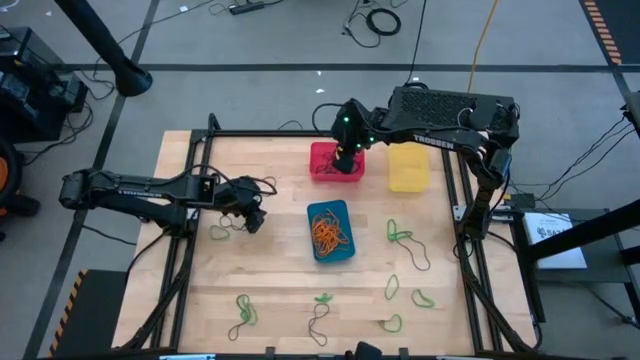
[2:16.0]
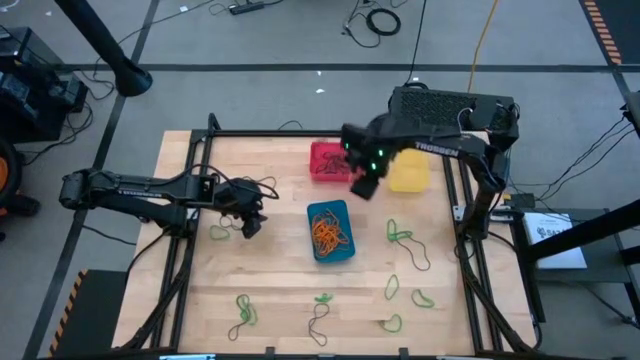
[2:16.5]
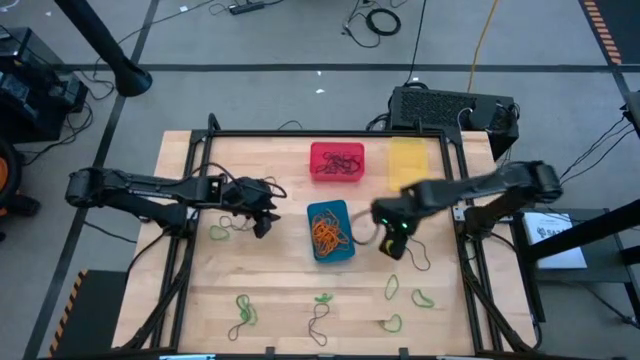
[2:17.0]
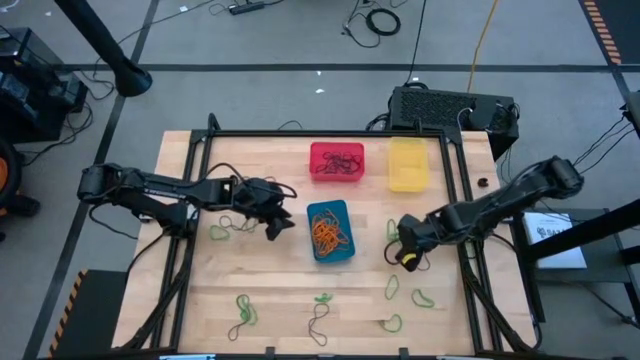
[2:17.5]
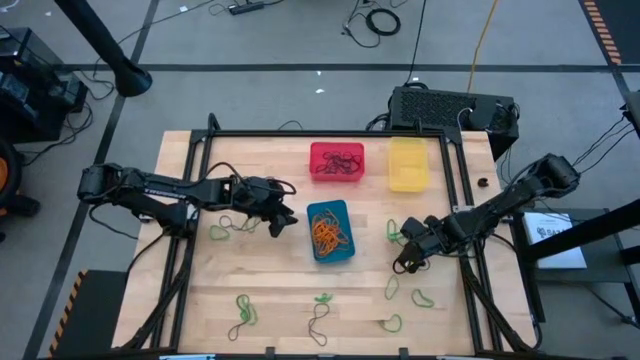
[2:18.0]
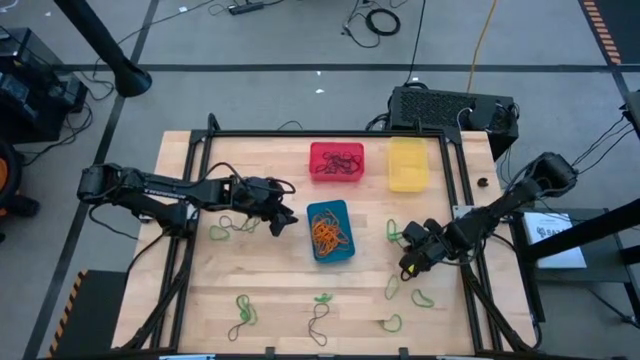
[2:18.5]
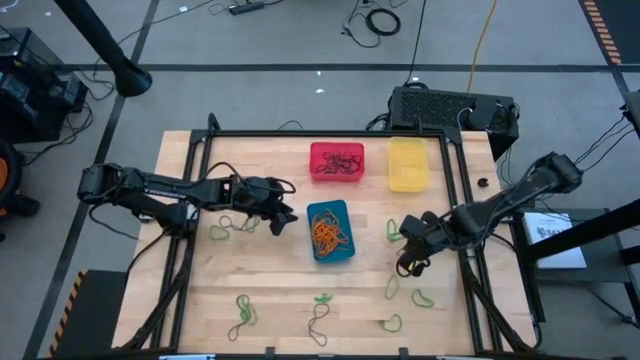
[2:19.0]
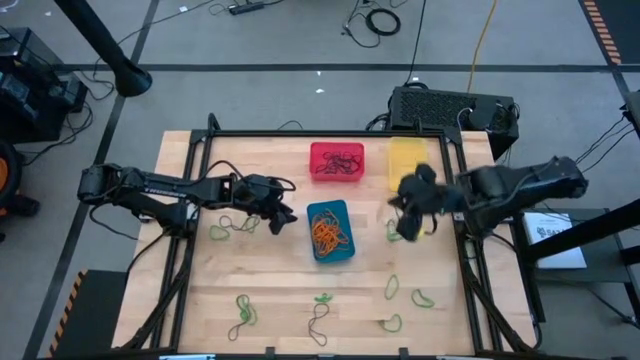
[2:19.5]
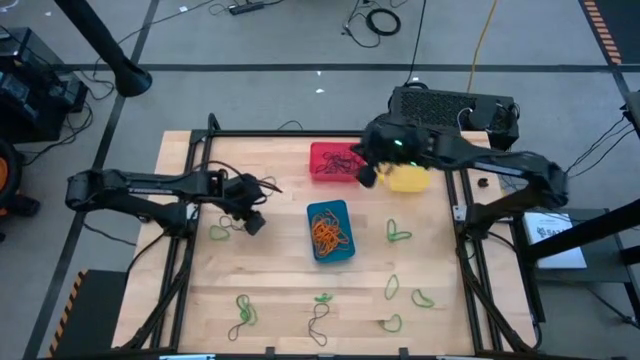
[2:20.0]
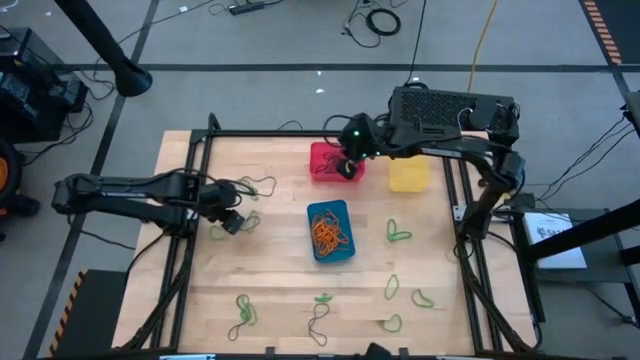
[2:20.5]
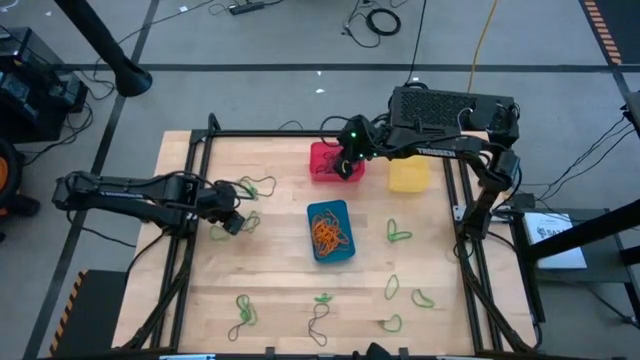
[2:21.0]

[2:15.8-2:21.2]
Task: Sort rubber bands into baskets
Put the purple rubber band into the red bin

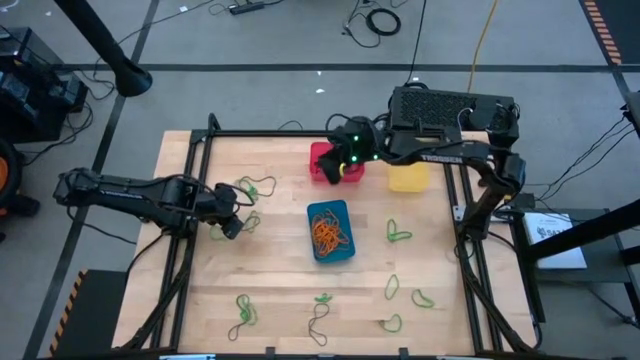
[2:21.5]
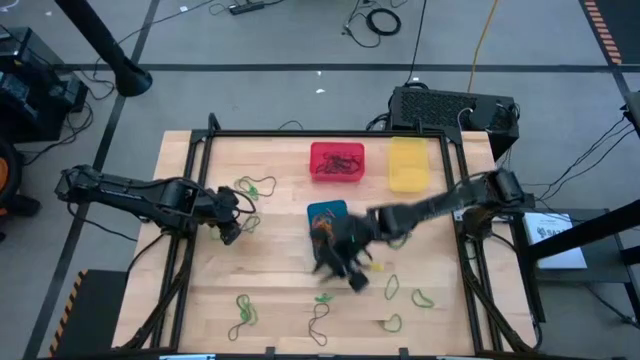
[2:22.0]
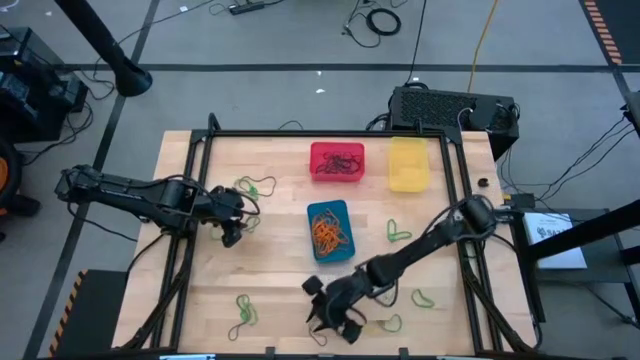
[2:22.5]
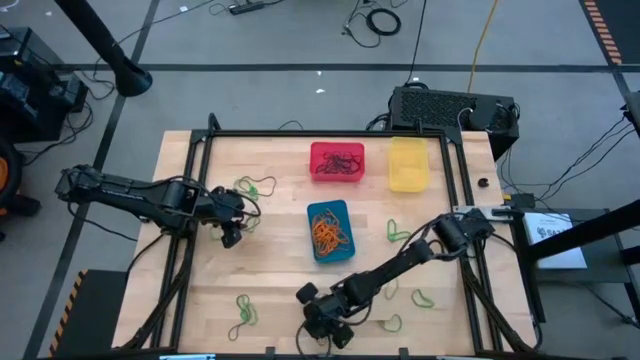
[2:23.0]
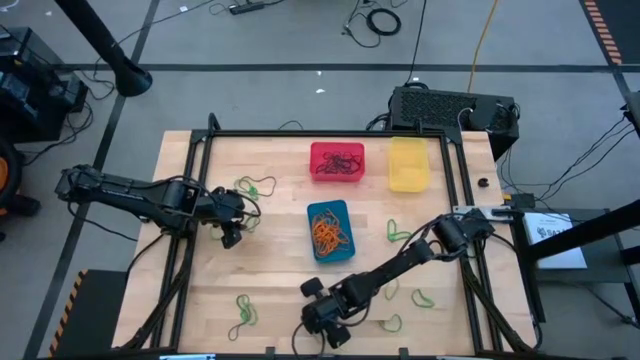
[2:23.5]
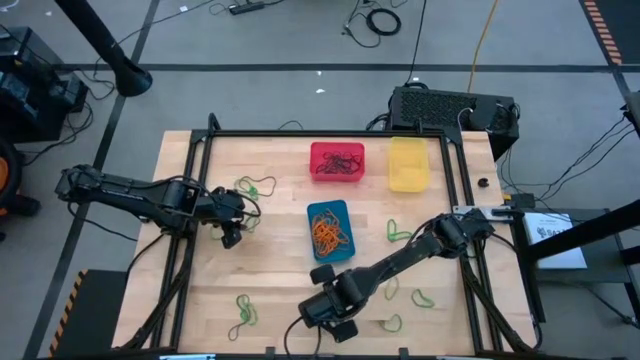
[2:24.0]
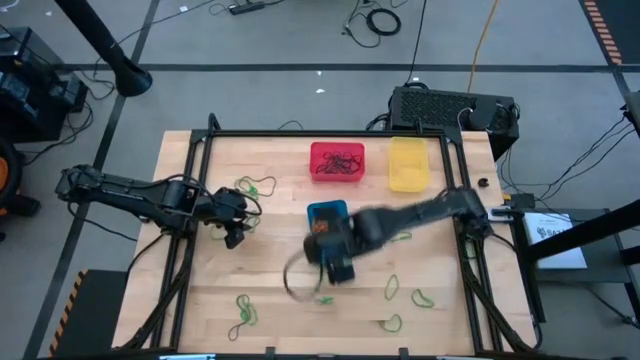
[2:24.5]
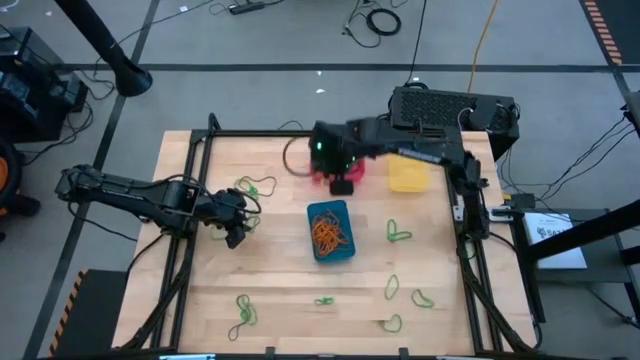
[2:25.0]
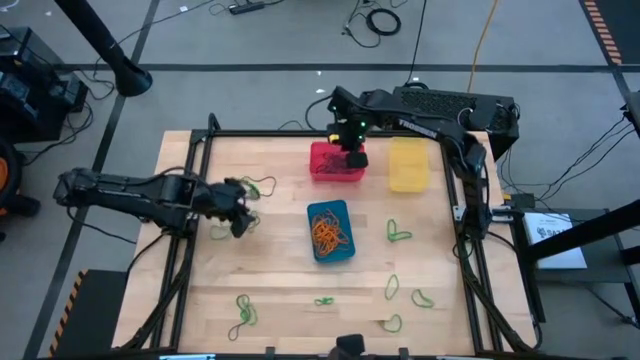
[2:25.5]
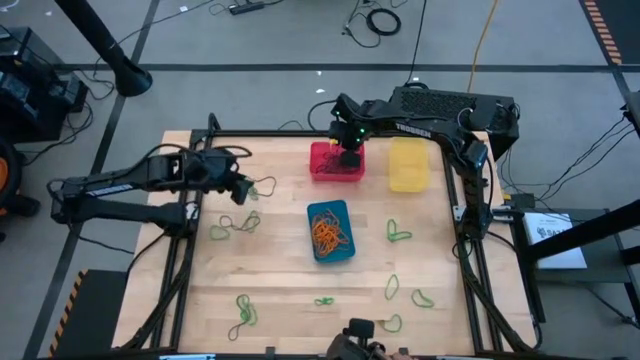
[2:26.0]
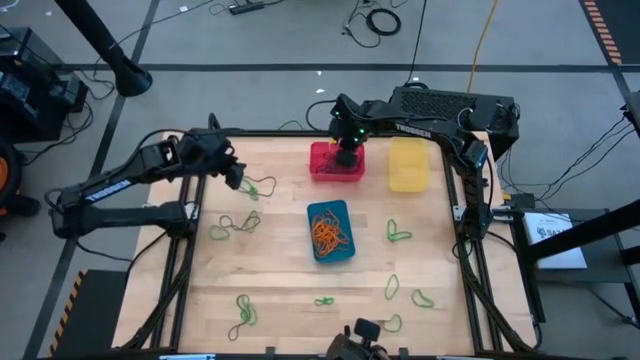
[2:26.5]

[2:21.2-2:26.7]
Put the purple rubber band into the red bin

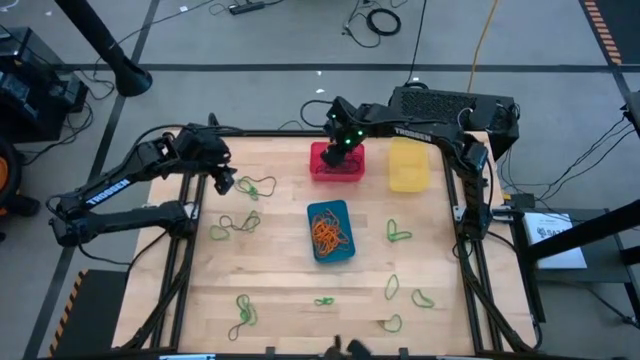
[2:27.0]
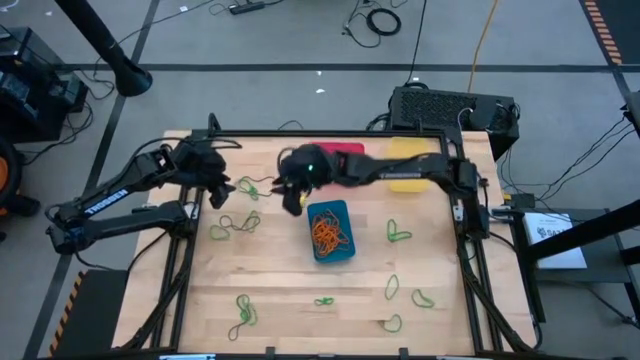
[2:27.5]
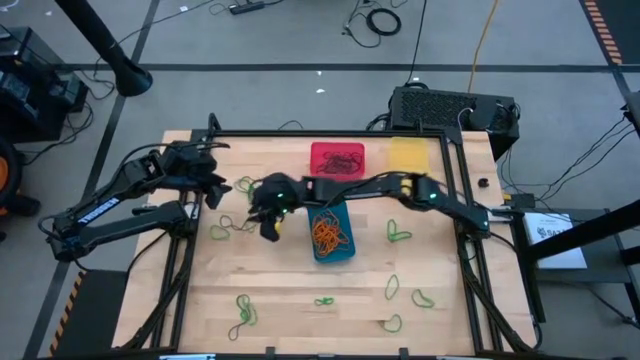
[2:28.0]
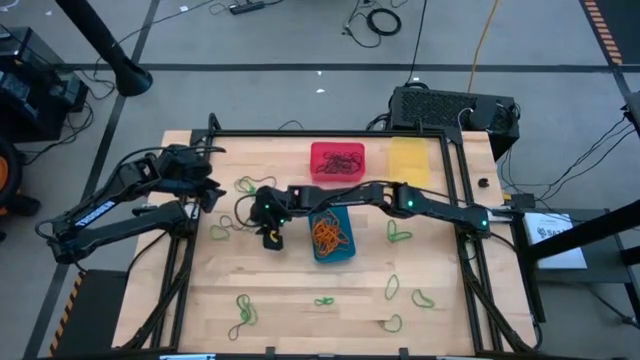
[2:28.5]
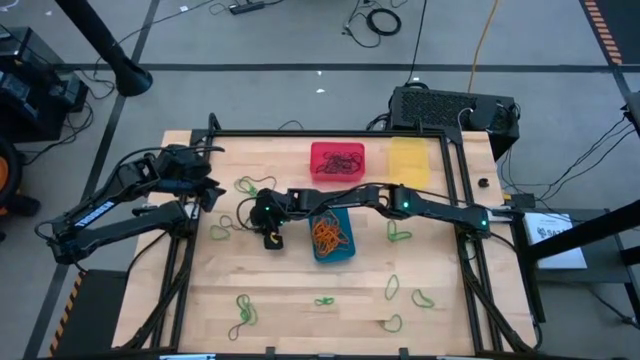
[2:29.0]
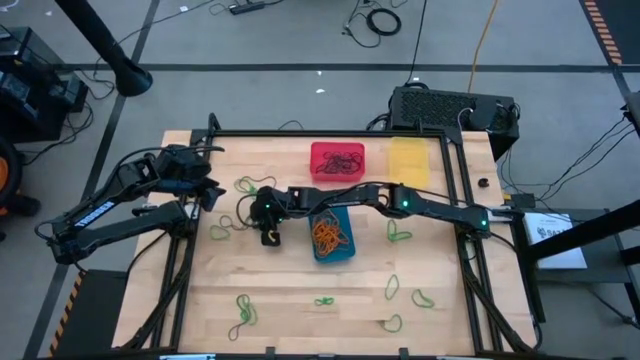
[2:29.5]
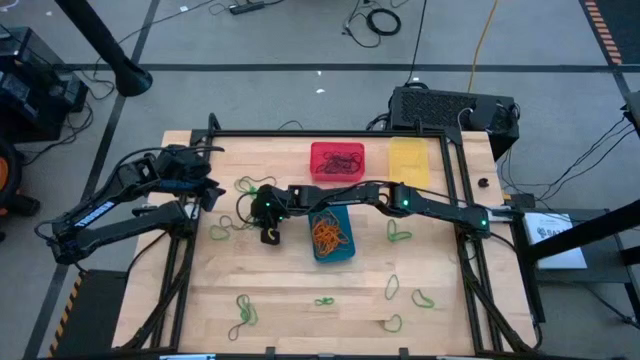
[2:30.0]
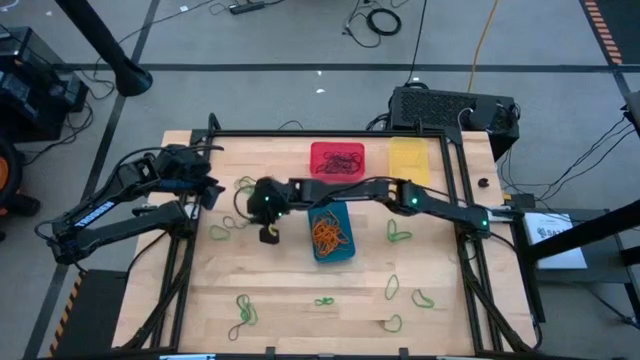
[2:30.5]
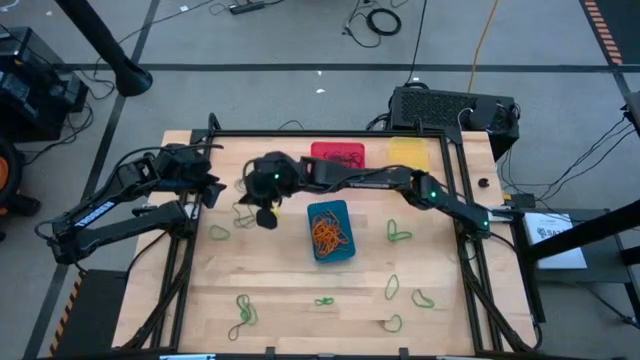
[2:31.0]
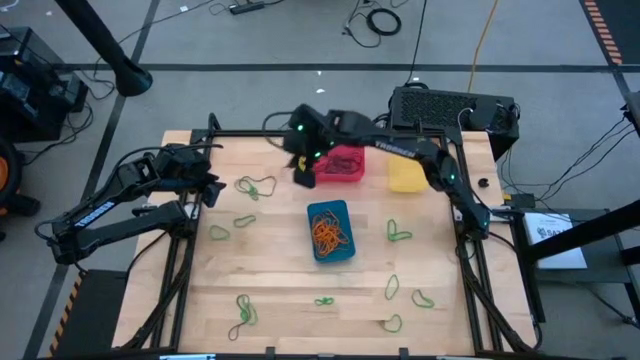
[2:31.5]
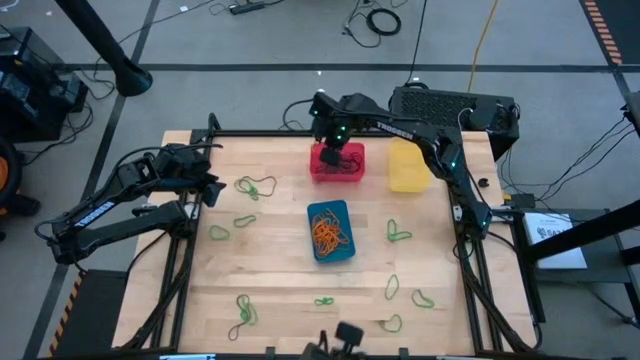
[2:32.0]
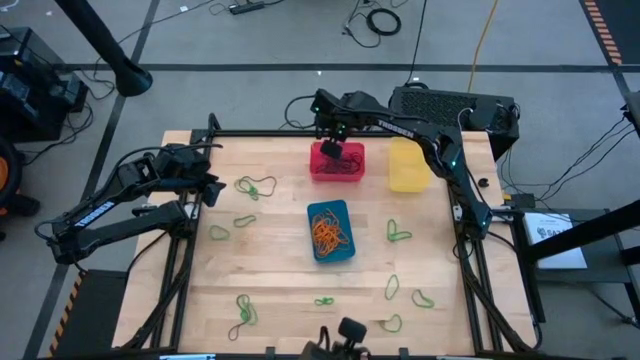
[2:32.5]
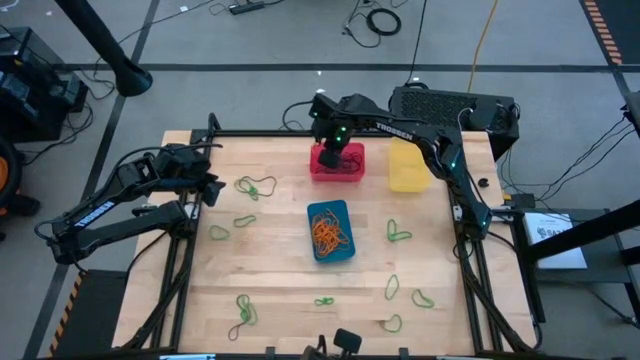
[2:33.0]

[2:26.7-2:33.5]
Put the purple rubber band into the red bin

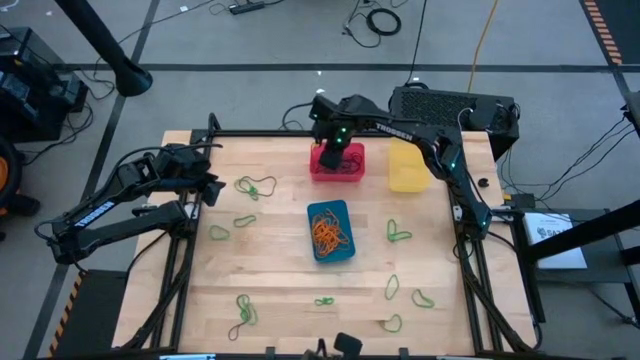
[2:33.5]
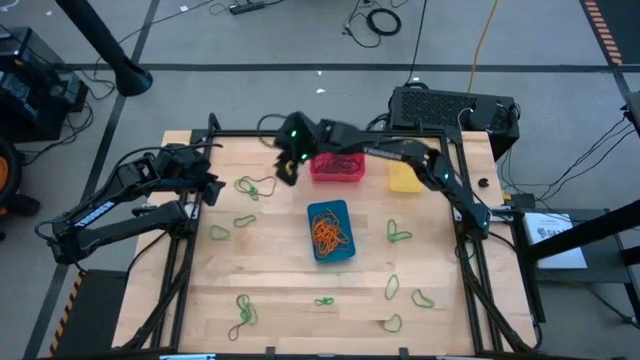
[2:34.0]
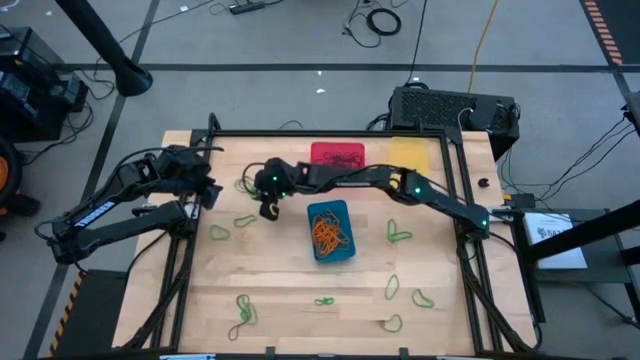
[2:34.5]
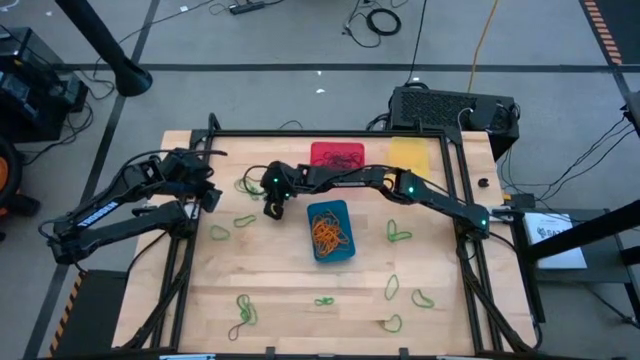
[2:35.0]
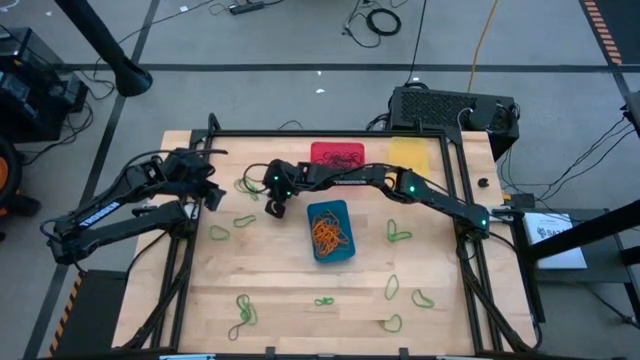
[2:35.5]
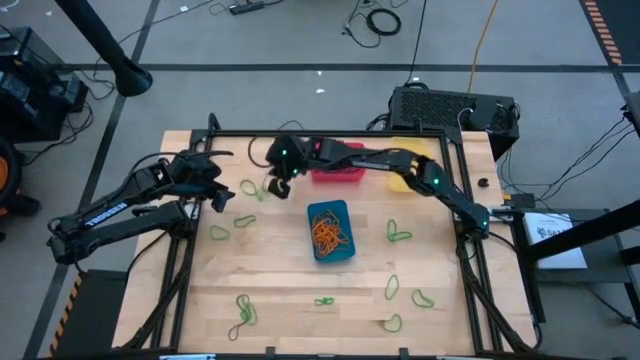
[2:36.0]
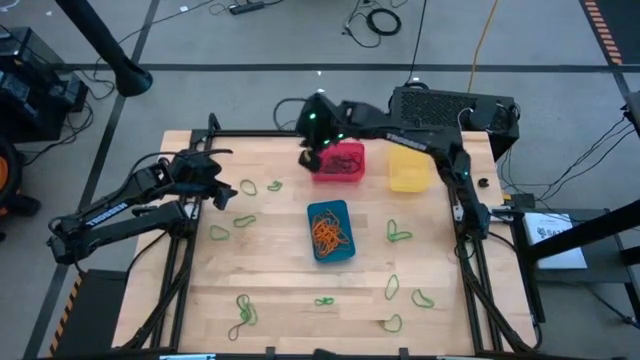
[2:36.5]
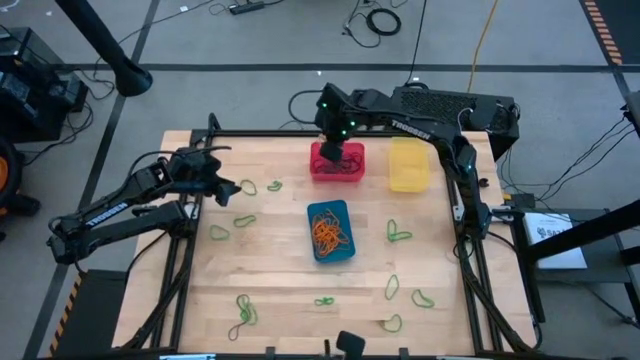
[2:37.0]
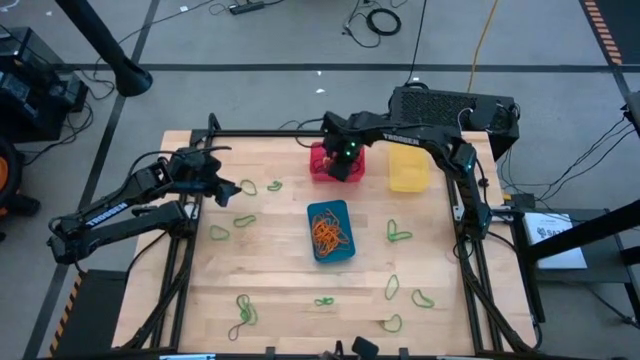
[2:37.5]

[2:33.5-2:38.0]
Put the purple rubber band into the red bin
